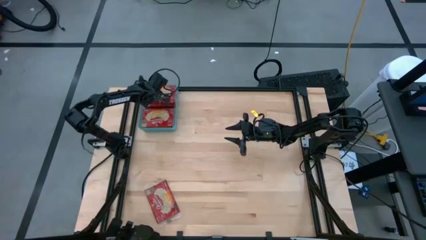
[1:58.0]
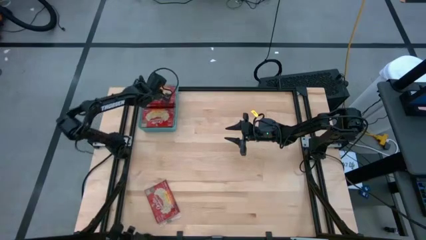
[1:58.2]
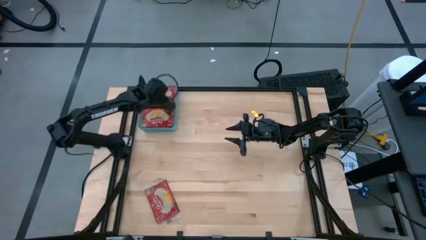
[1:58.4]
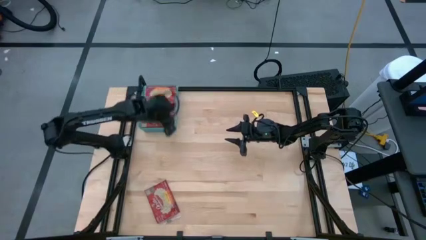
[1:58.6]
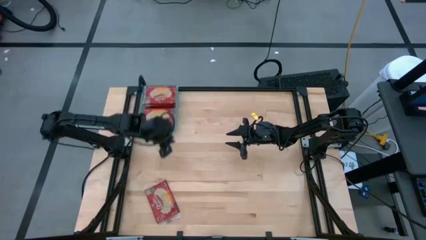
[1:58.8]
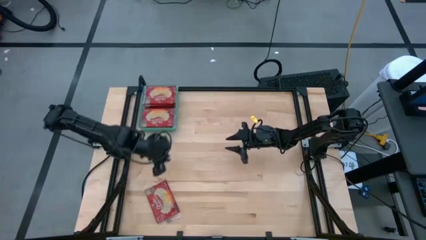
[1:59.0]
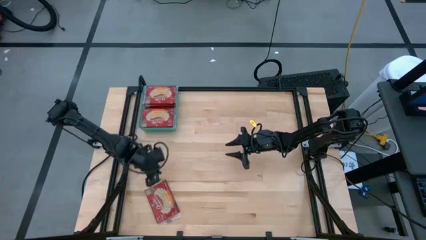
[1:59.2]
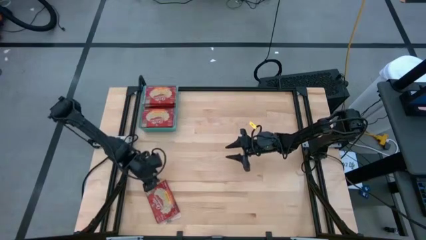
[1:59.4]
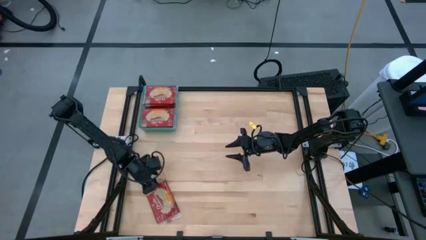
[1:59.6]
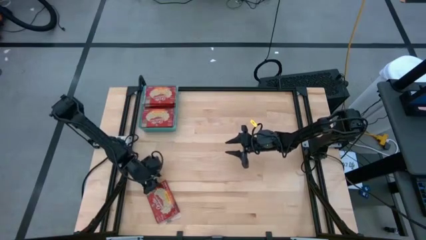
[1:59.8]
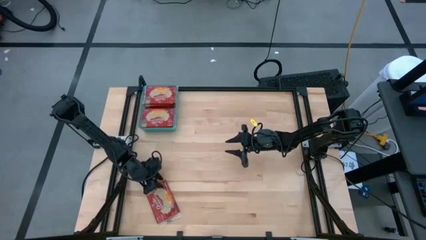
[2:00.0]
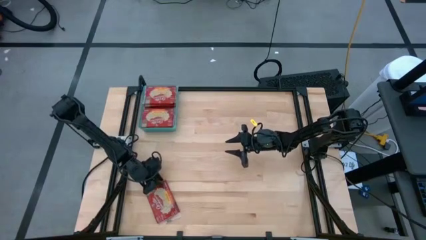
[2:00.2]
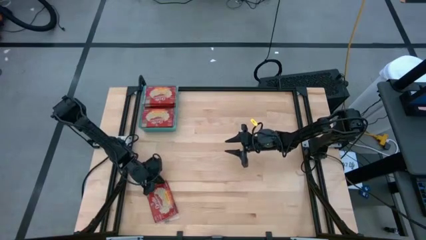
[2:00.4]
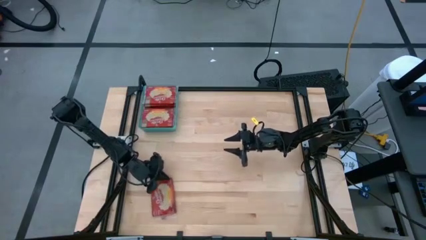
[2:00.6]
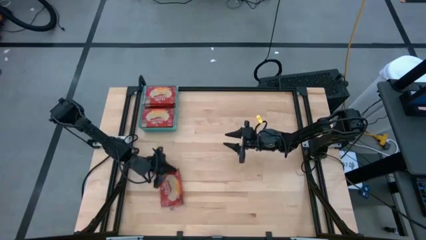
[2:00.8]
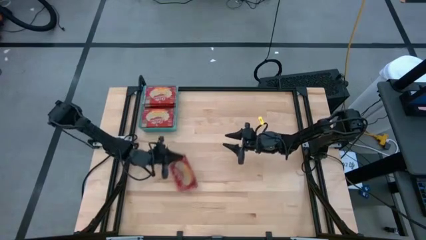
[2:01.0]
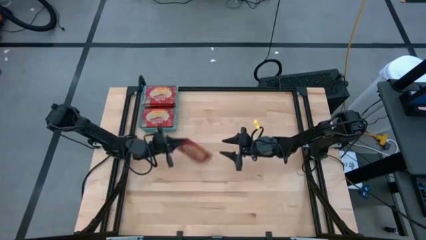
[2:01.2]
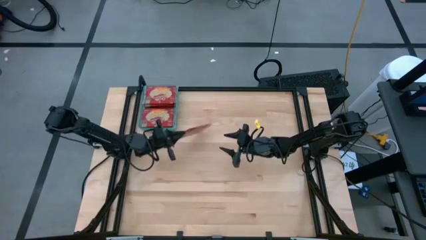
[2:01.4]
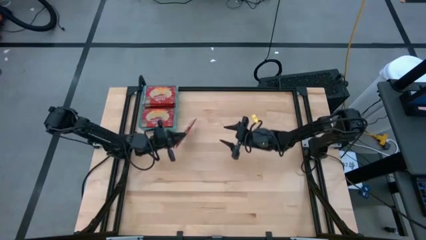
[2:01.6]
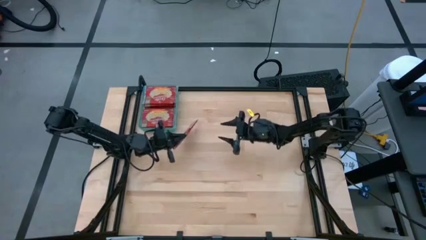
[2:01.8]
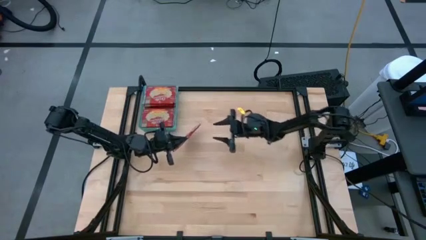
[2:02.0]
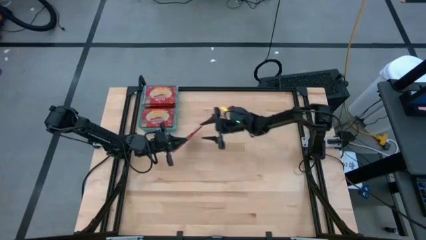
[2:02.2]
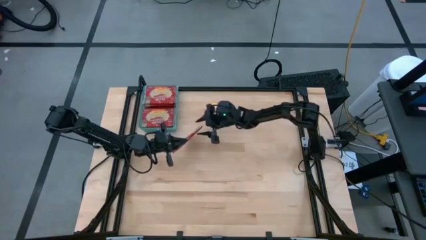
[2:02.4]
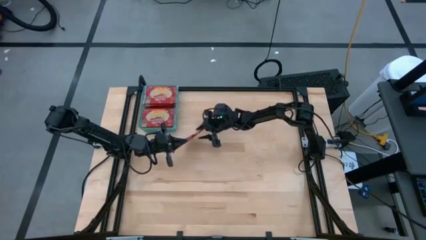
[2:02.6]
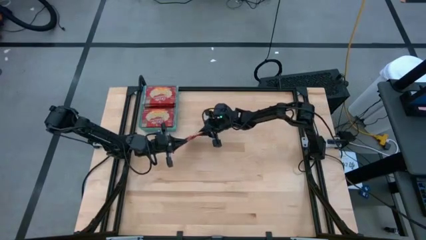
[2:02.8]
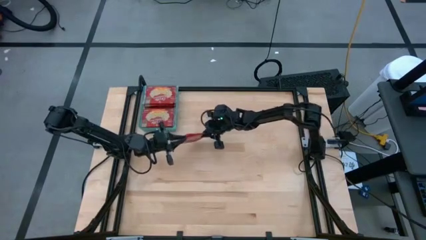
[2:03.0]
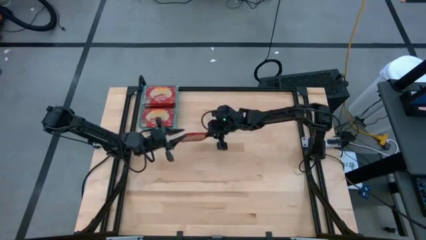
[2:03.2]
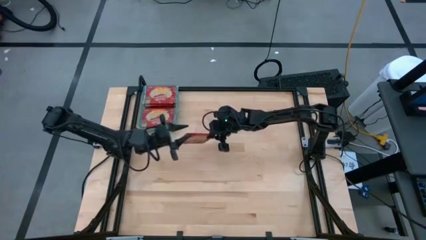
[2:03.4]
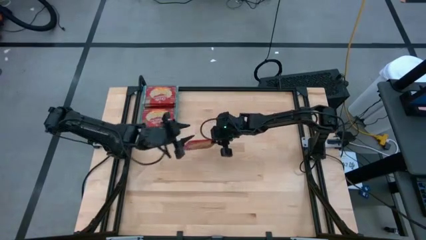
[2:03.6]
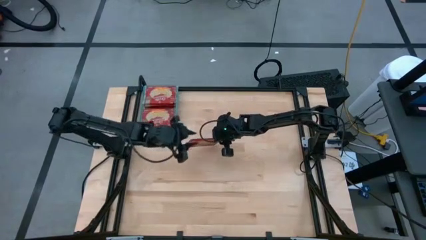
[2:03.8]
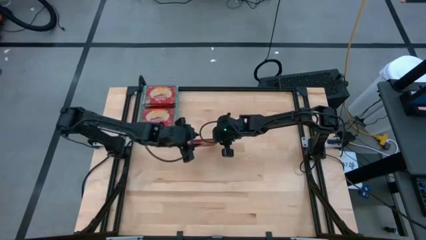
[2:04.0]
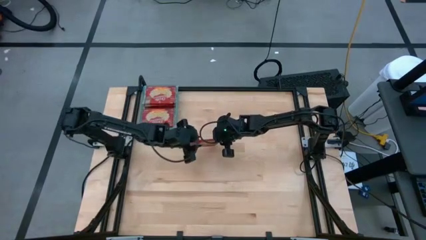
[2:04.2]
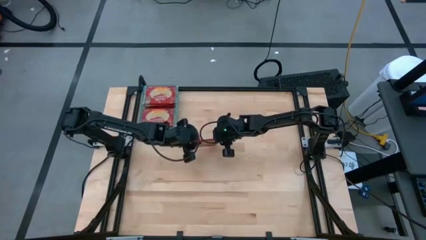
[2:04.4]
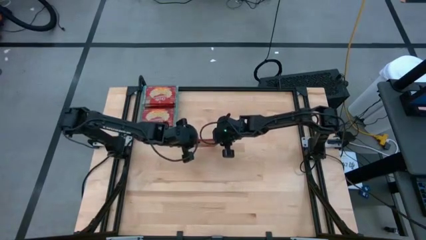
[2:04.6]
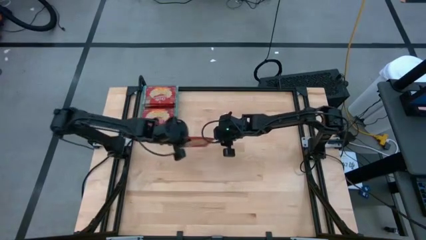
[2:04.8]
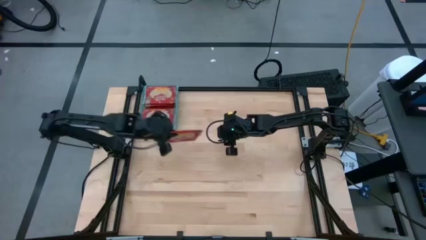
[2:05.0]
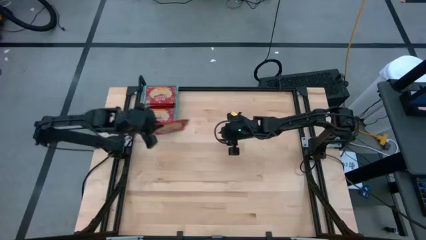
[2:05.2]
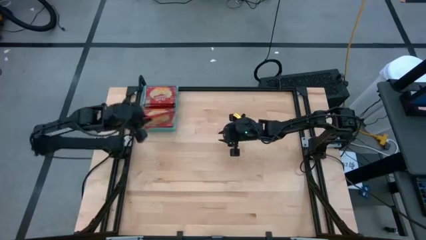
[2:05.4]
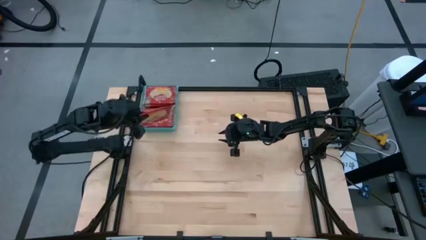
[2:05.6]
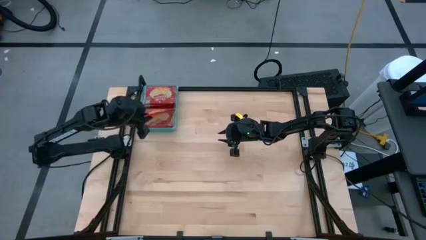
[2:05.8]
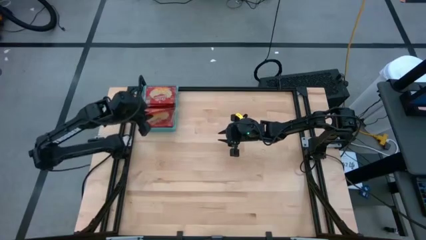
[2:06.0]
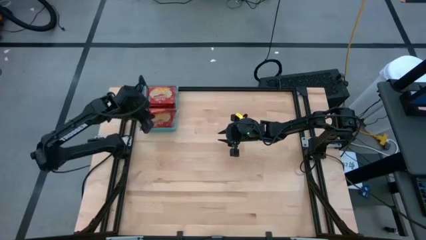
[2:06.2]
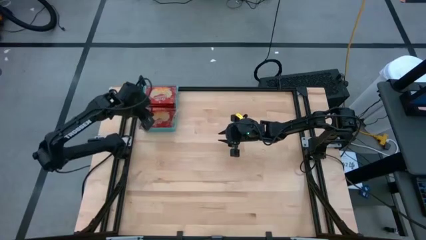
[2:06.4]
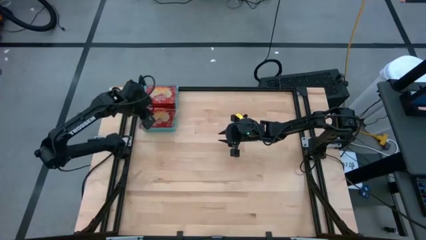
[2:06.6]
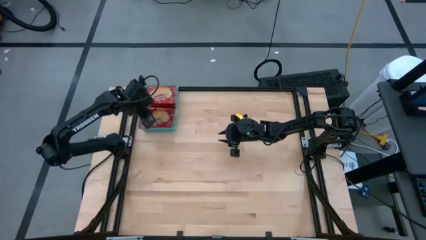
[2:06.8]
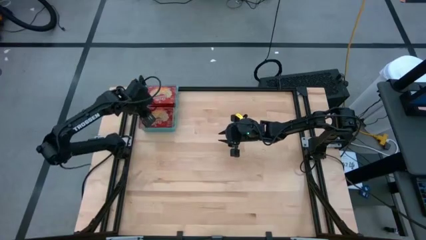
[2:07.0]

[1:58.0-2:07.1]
Task: Sort popcorn bags into baskets
Put the popcorn bag into the blue bin

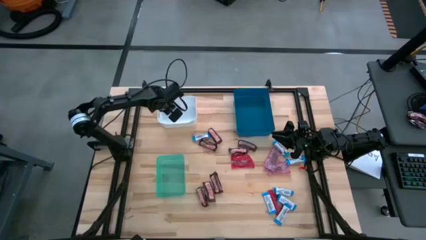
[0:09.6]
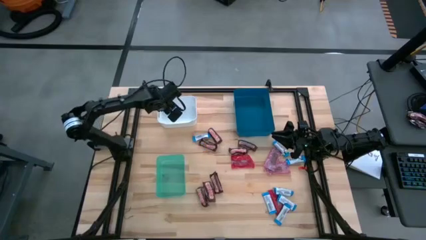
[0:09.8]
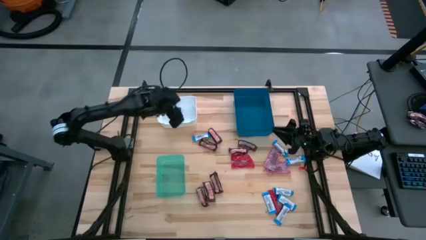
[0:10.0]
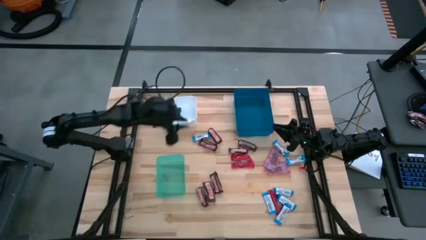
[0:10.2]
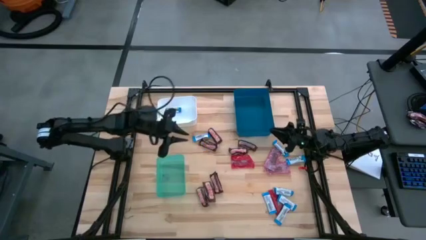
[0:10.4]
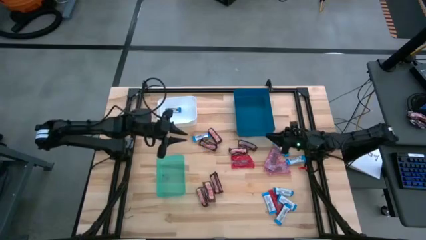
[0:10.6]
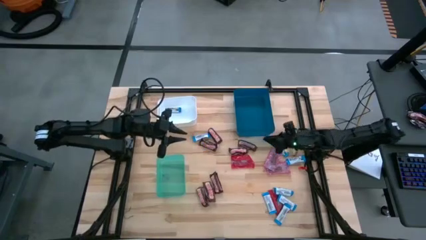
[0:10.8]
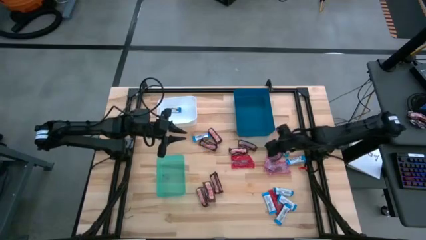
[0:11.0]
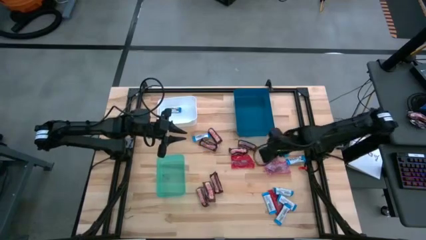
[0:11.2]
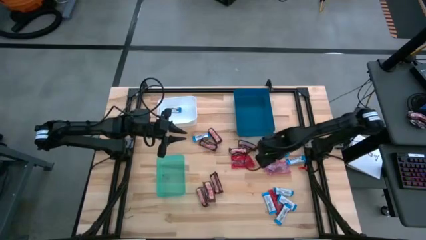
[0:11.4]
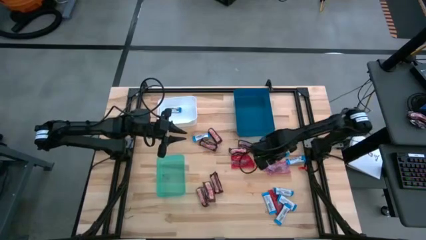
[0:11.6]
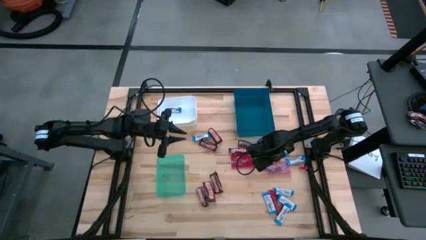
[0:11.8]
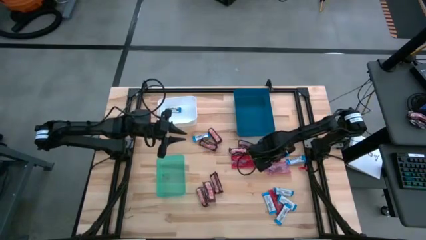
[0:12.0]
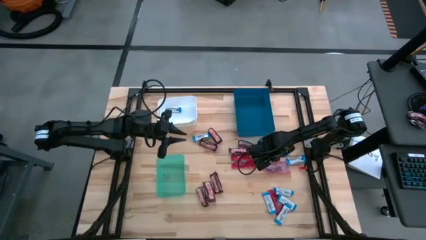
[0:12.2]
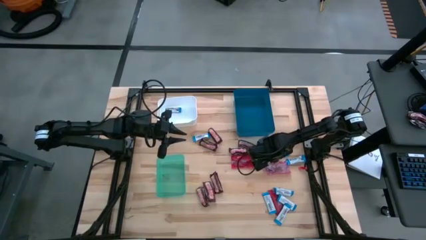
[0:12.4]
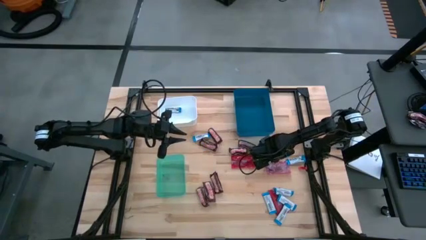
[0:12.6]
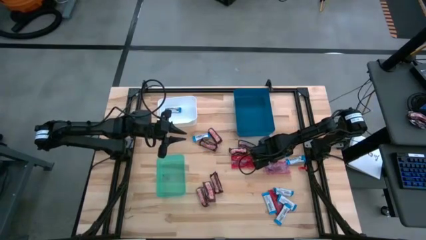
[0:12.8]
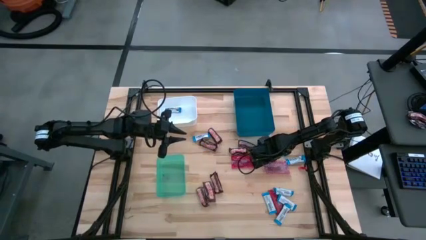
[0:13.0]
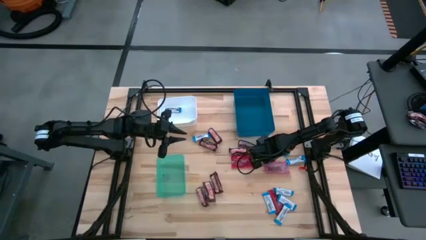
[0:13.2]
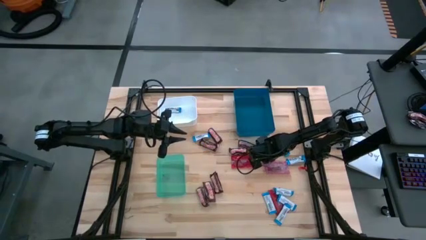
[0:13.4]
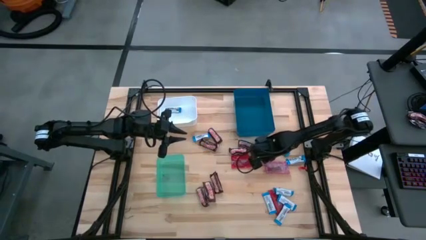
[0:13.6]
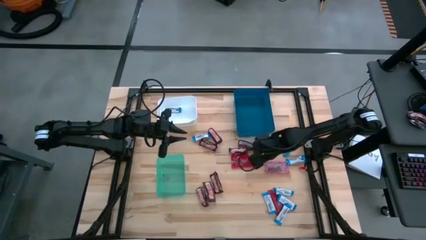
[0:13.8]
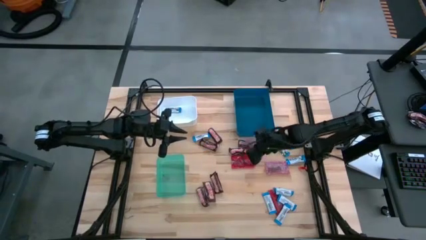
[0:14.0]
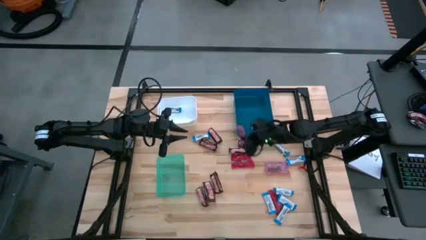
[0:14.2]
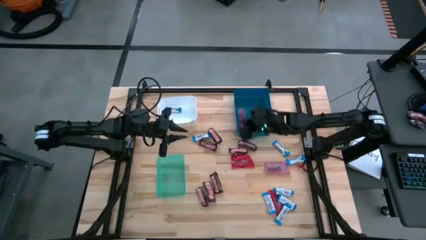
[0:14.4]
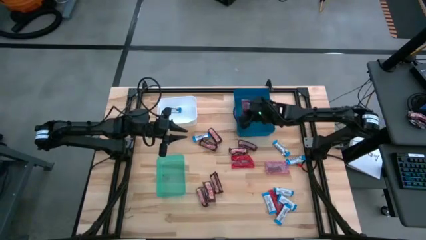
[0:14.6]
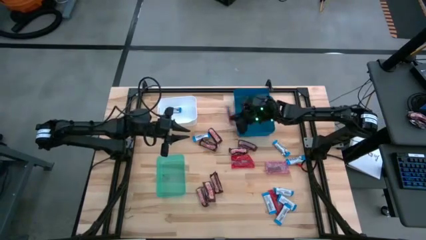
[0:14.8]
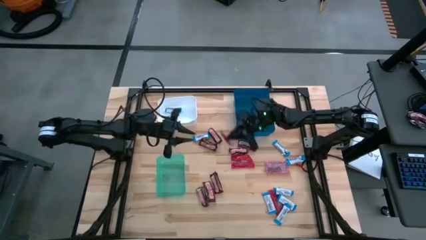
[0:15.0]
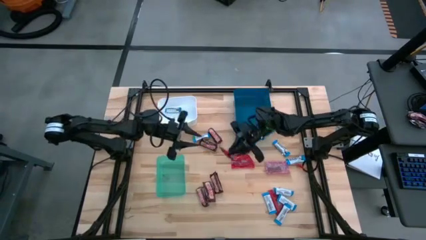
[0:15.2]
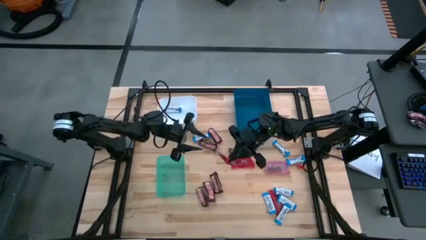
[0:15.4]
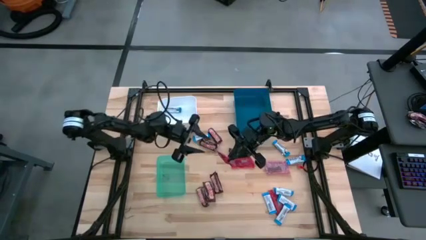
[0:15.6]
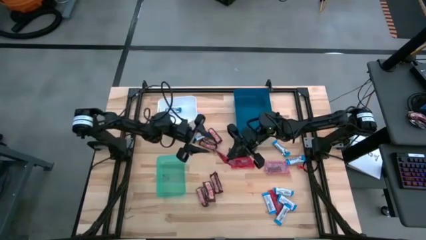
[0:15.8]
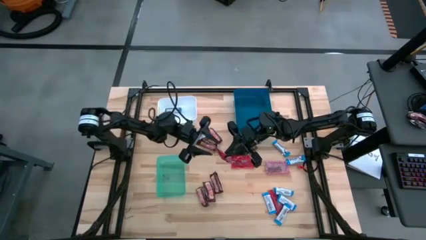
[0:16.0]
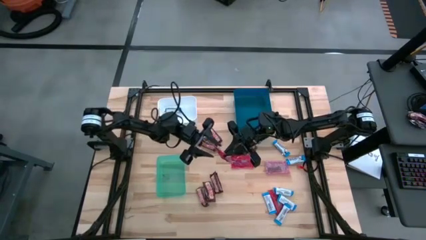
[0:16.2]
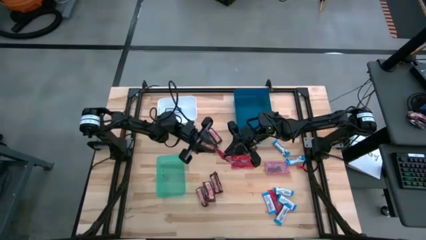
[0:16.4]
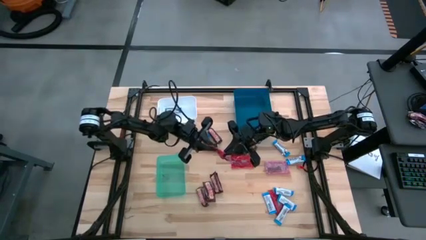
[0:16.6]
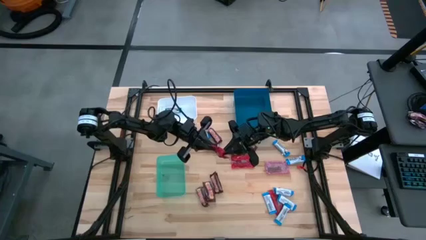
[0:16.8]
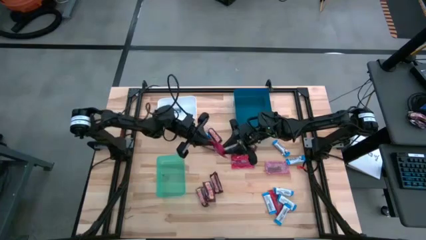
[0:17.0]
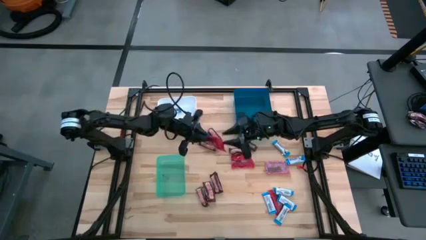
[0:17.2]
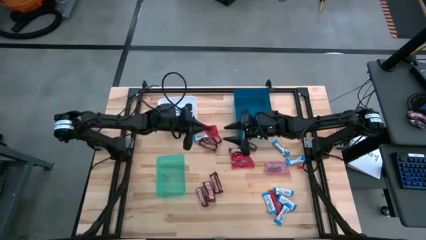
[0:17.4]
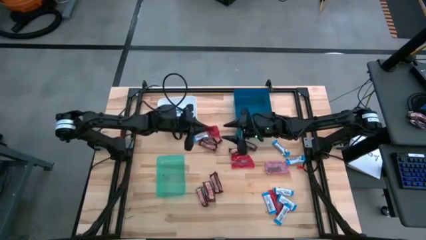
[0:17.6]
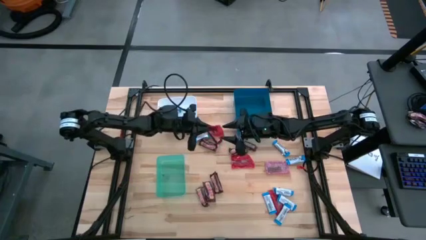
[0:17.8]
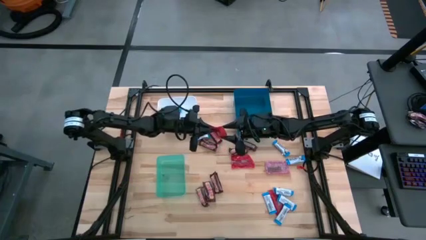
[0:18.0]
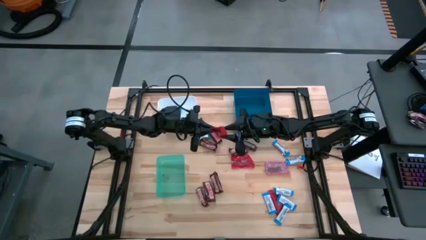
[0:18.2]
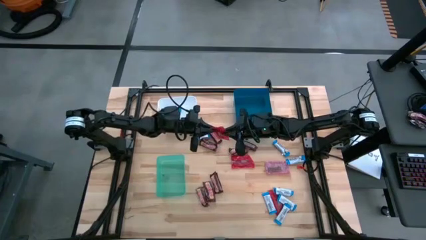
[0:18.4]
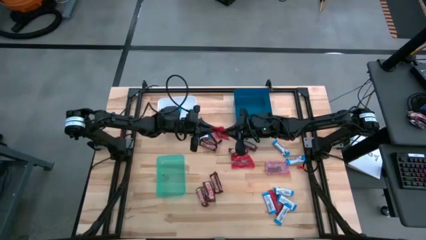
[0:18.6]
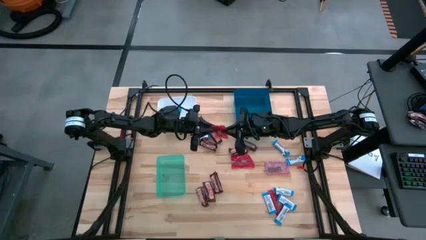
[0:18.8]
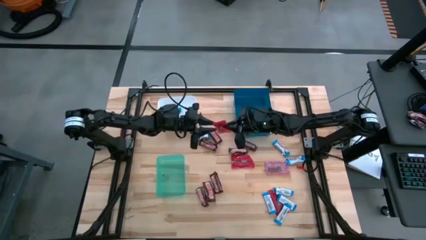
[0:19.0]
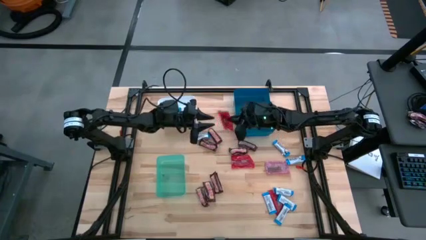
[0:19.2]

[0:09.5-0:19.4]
Task: Sort candy
Put the red candy into the blue bin
